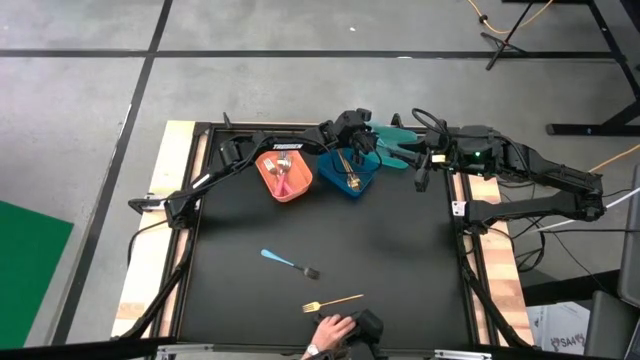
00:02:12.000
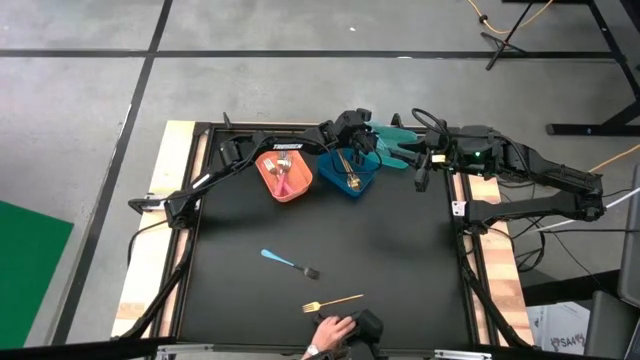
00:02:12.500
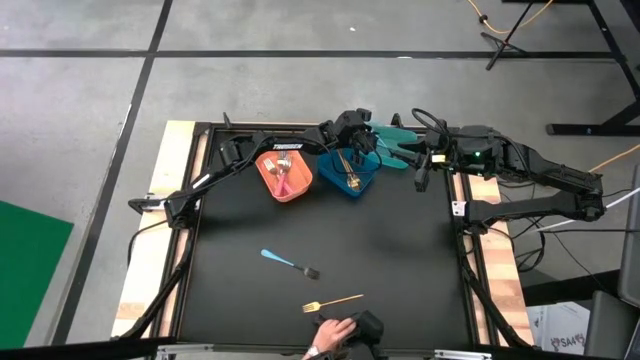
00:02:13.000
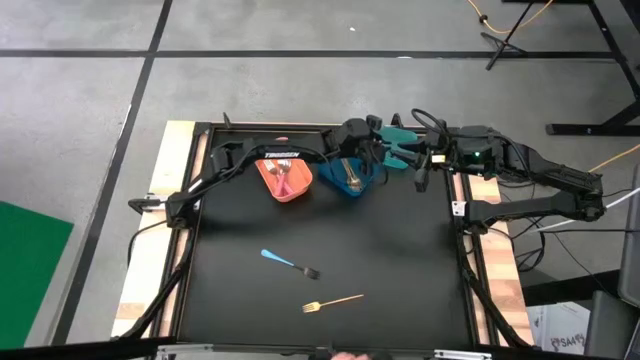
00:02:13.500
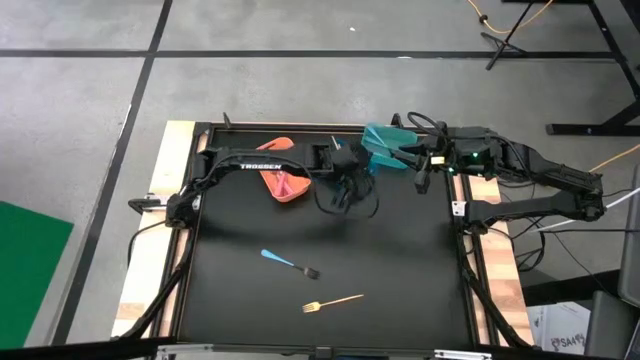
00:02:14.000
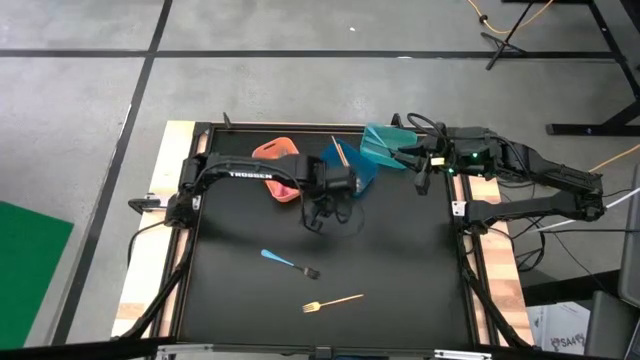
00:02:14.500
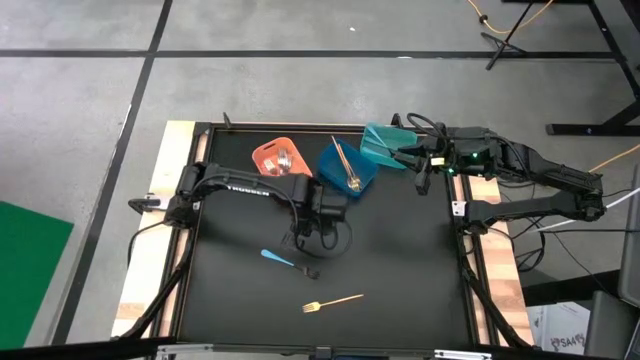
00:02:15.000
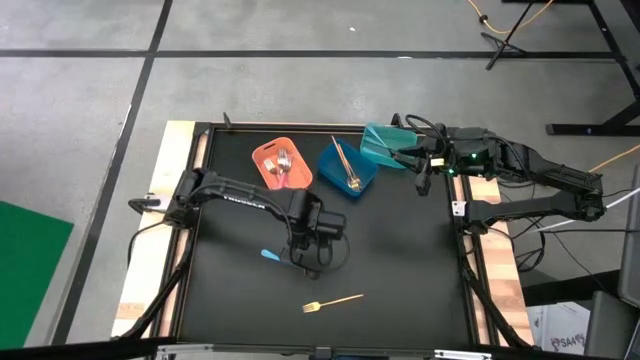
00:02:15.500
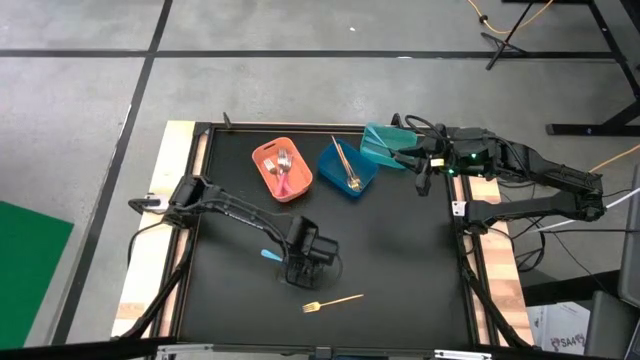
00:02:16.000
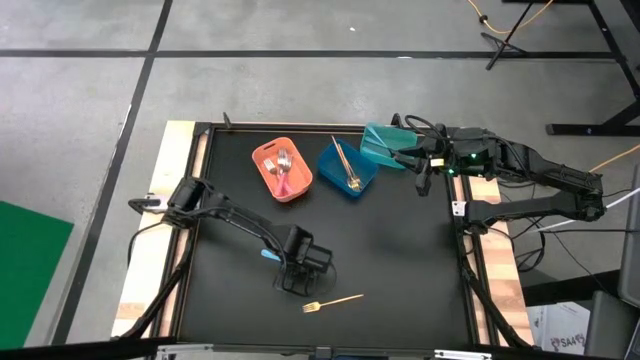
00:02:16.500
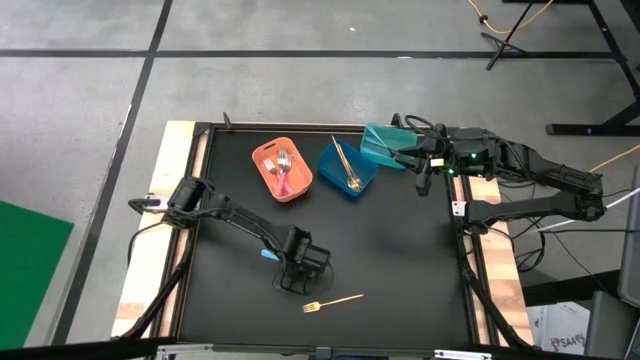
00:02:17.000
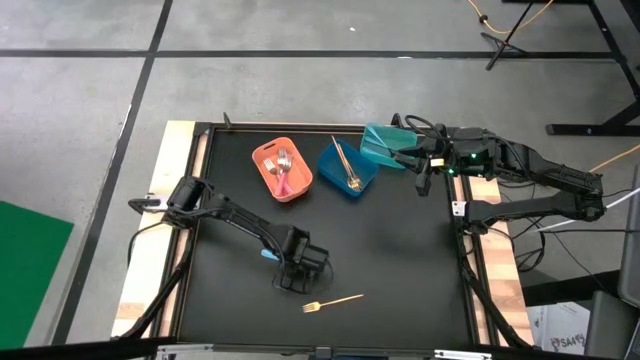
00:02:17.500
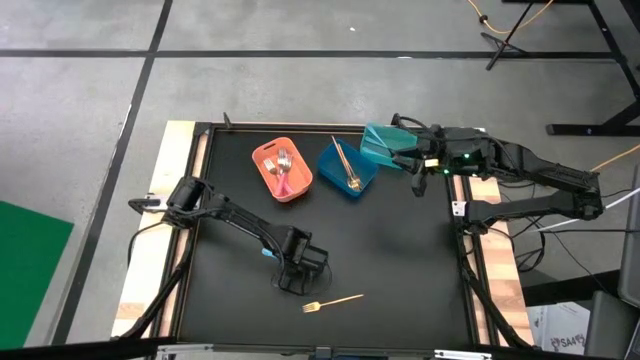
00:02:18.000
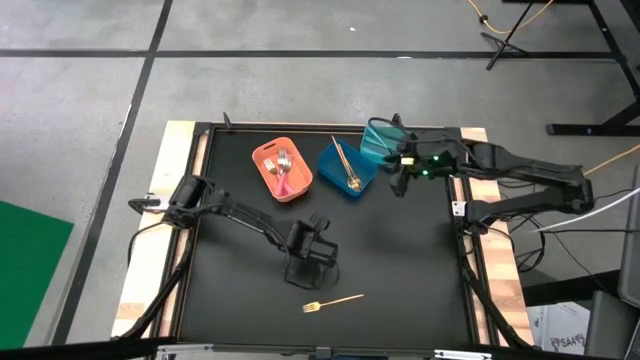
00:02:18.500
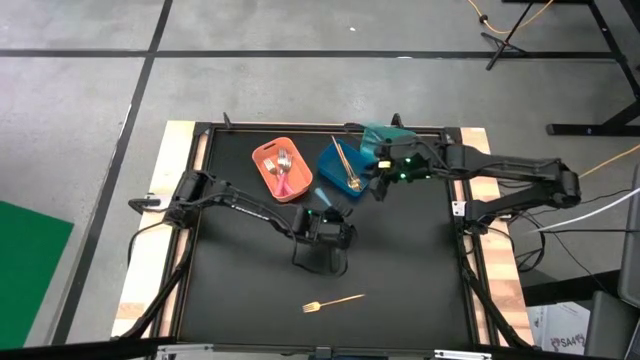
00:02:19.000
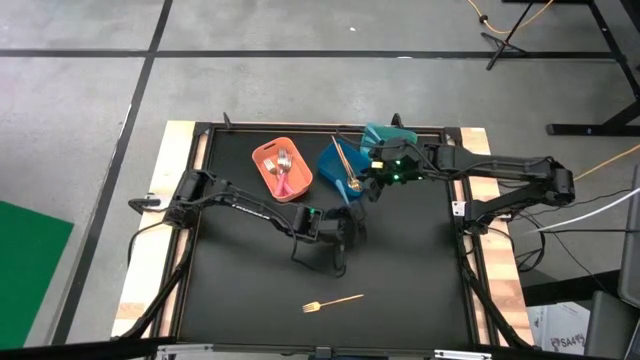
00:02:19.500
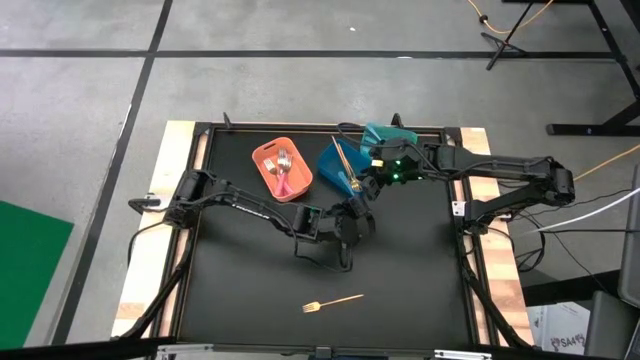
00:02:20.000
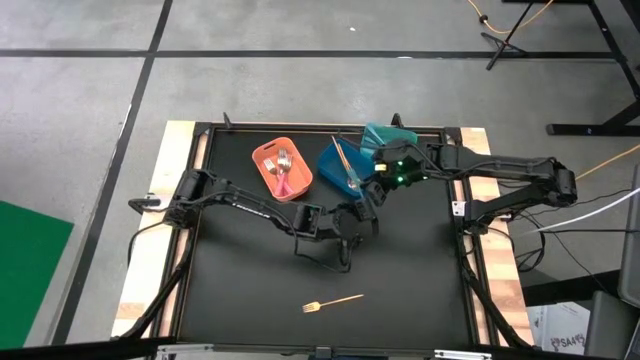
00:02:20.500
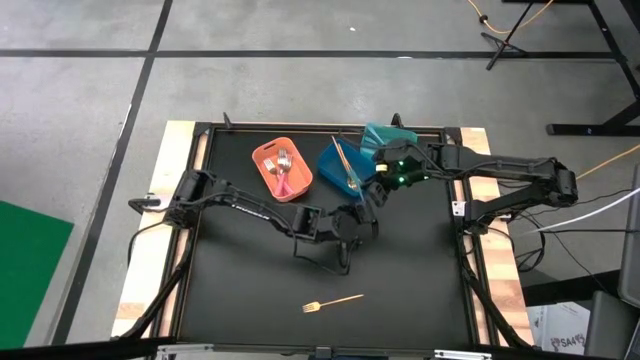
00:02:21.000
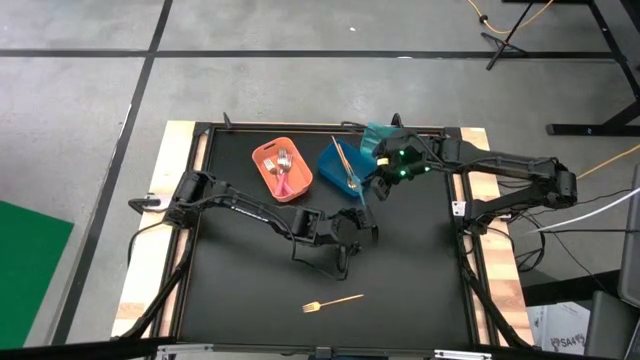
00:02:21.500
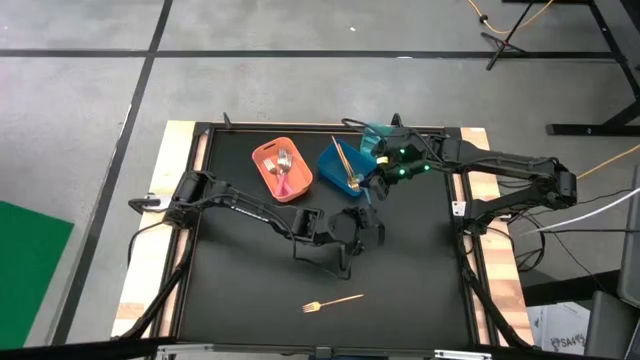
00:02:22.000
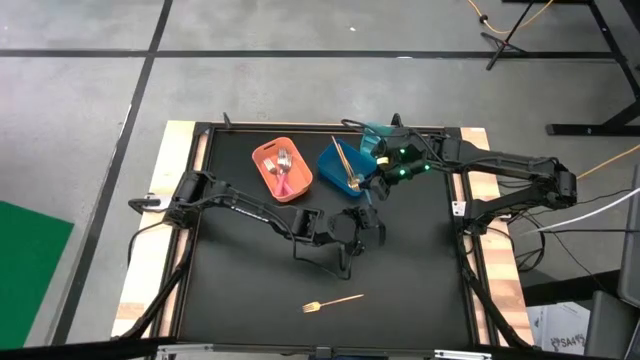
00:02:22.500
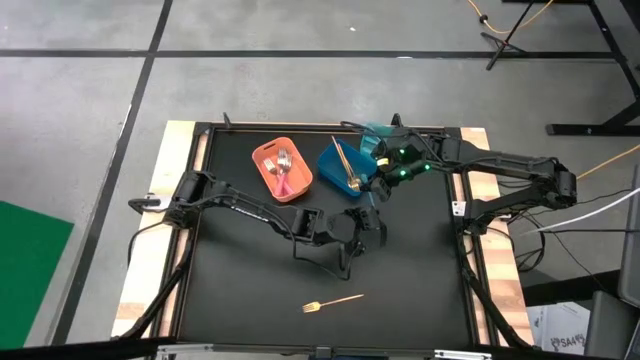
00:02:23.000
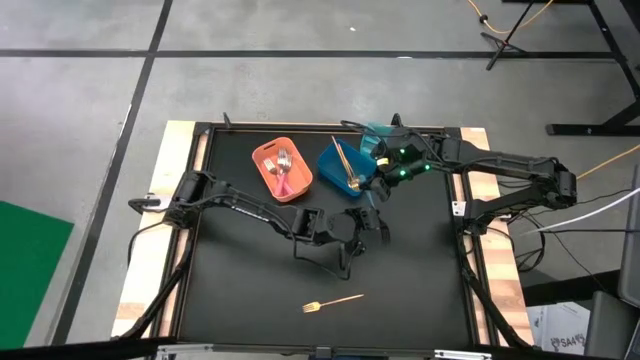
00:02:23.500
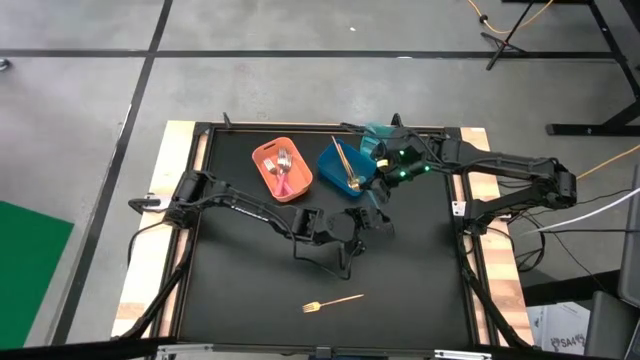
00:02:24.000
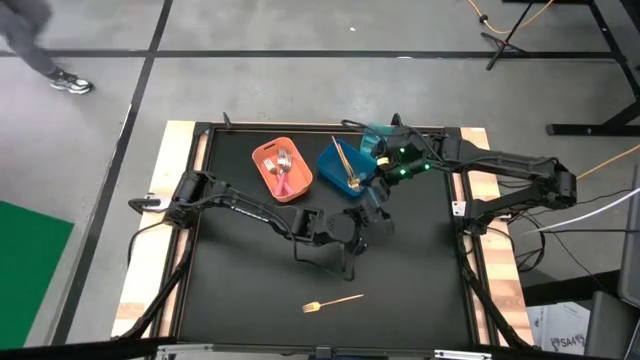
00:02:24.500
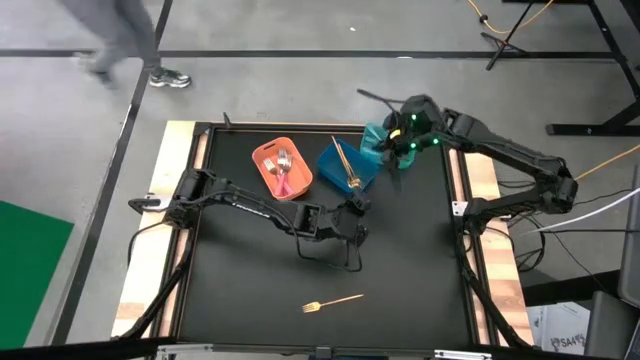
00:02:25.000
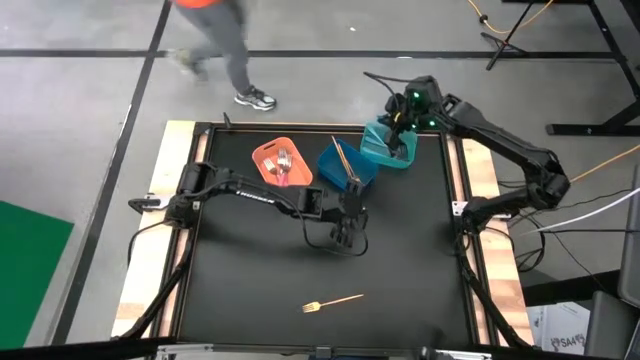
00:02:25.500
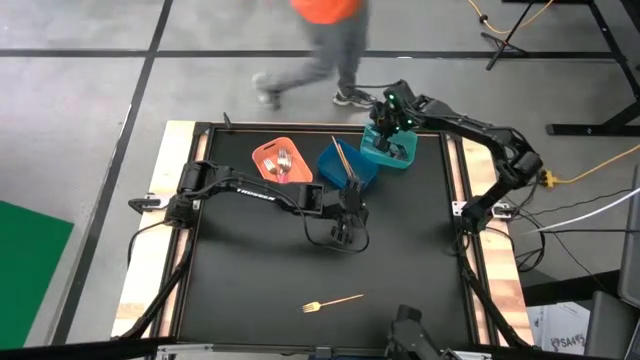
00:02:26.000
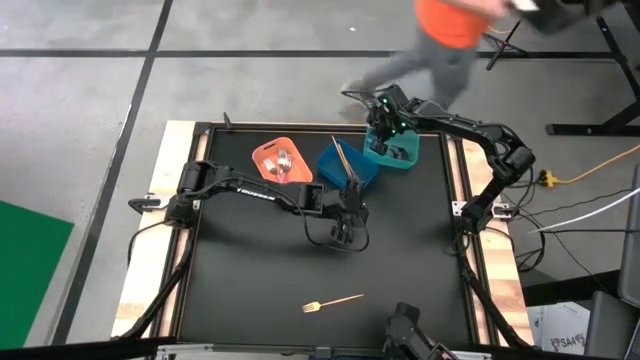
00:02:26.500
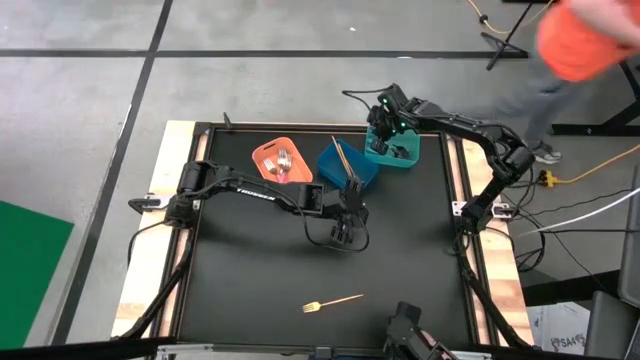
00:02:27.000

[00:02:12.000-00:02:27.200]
Task: Sort silverware by color (type)
Put the blue fork into the green bin

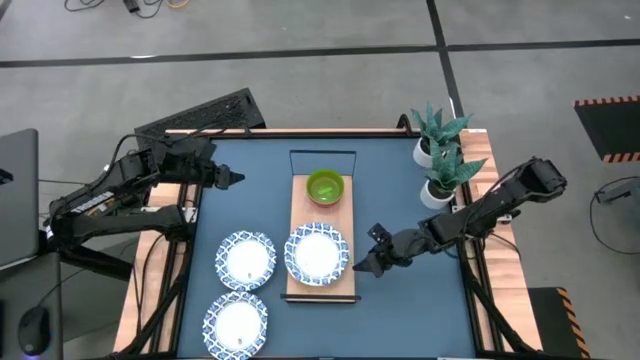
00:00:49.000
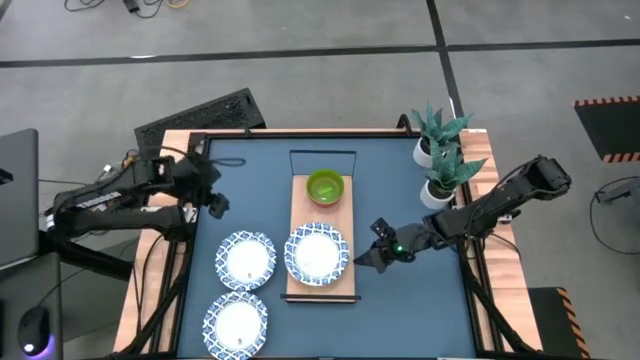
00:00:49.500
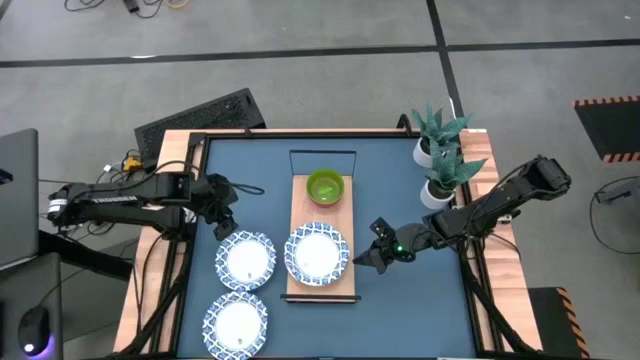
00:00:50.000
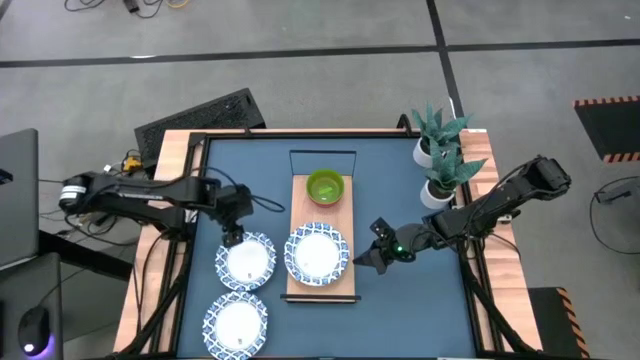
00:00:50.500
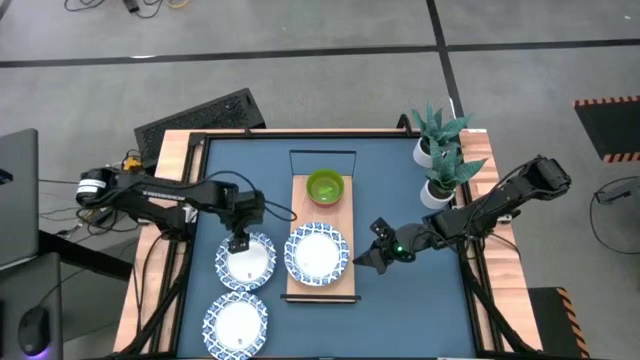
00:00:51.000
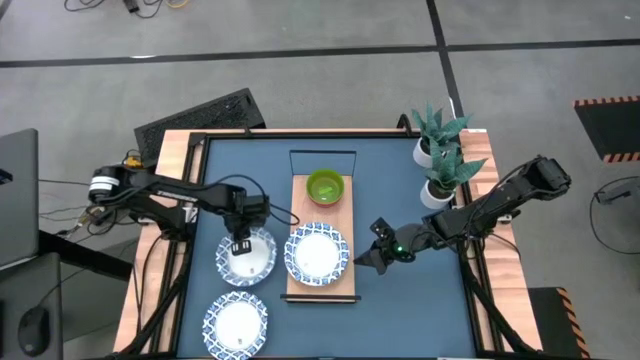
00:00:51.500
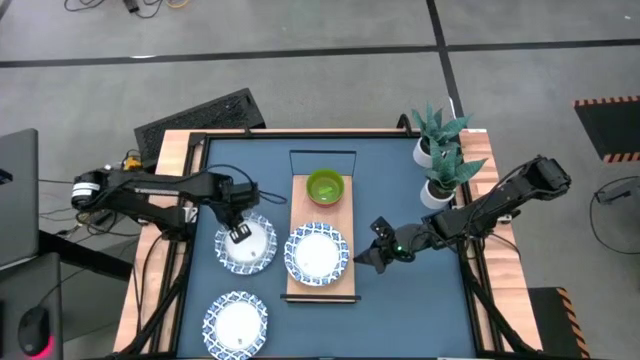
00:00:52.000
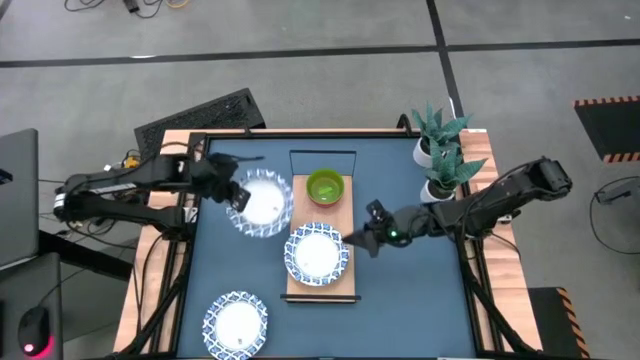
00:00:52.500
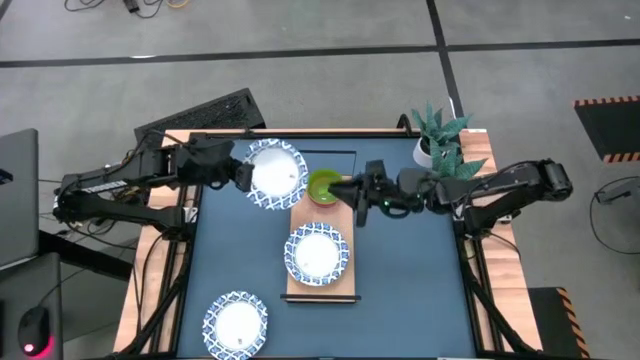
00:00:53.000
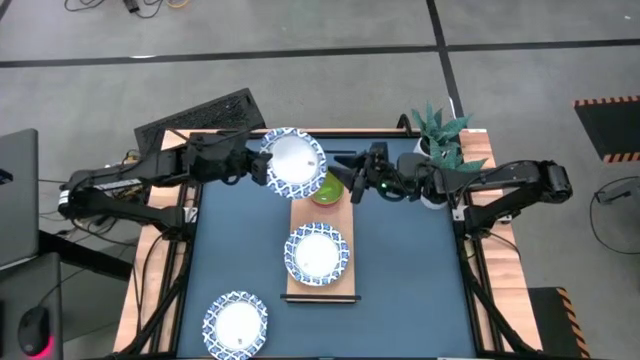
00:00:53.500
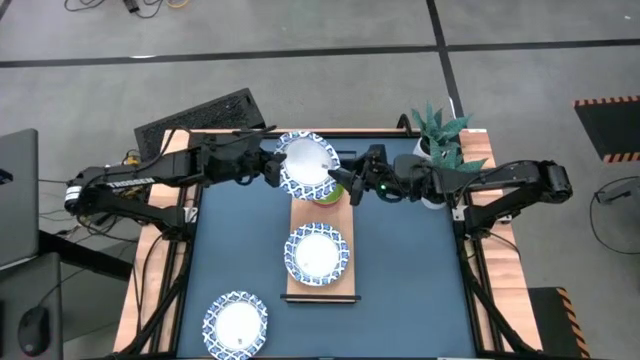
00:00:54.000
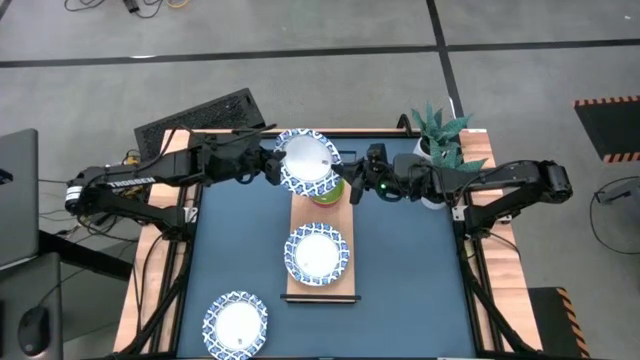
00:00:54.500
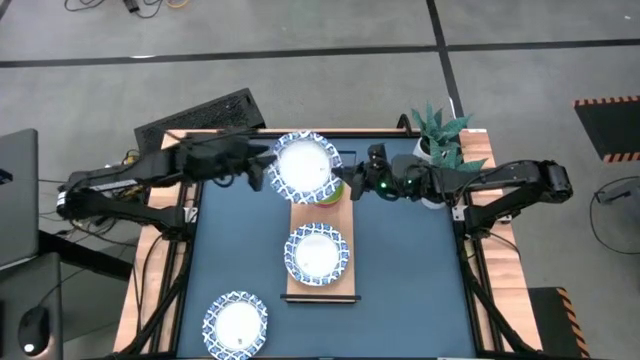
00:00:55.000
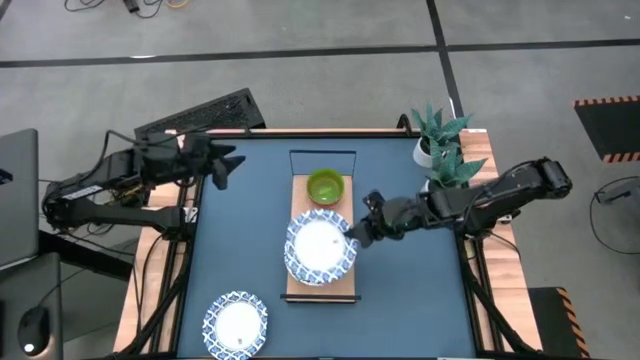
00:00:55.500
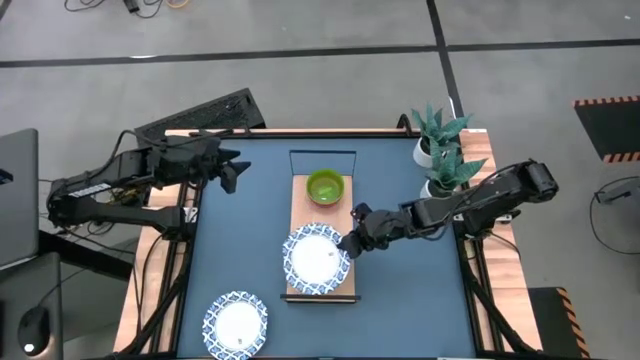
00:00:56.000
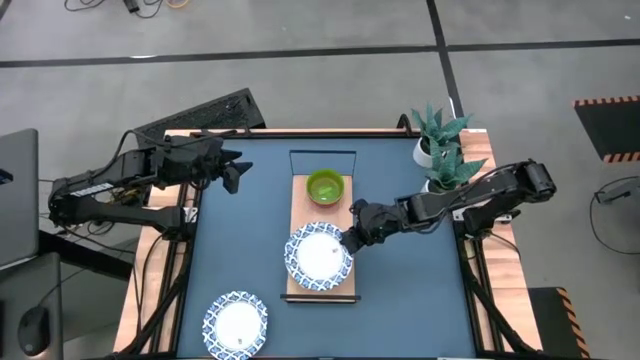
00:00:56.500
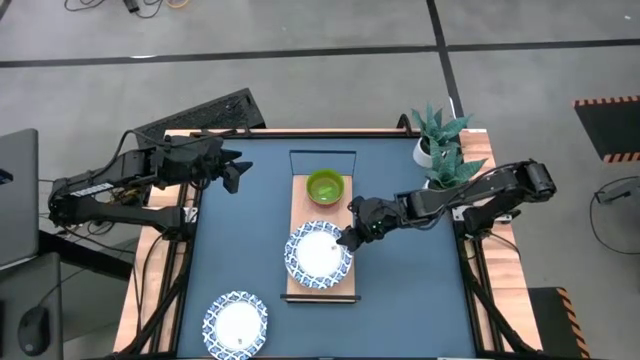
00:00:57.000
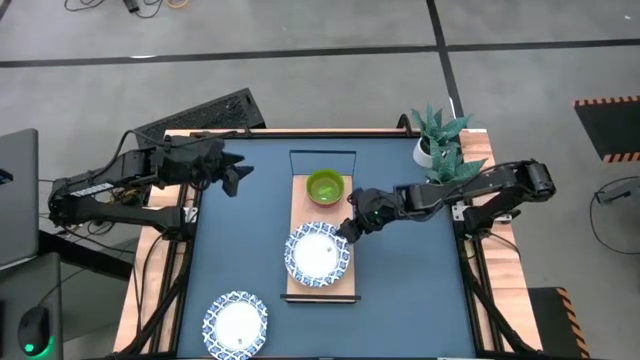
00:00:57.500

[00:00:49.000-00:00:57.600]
Task: Place and stack bowls onto a shelf
Stack the white patterned plate on top of the other white patterned plates on the shelf
